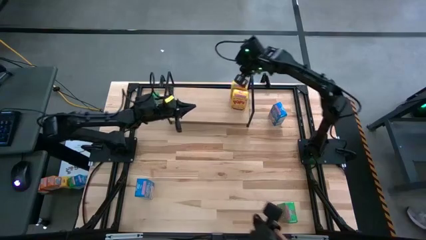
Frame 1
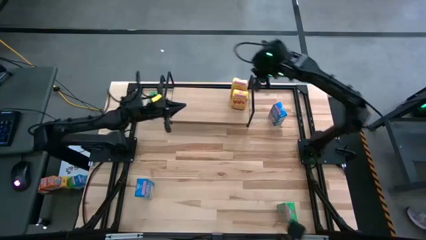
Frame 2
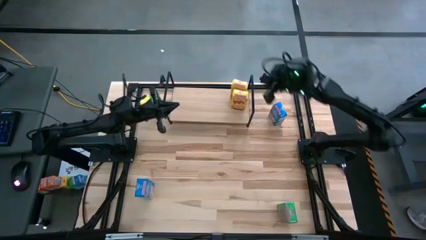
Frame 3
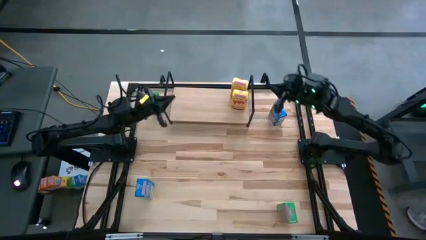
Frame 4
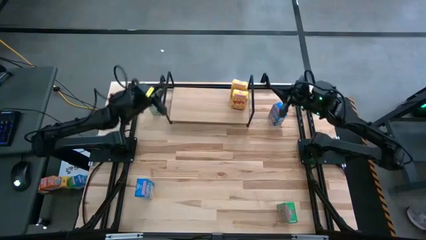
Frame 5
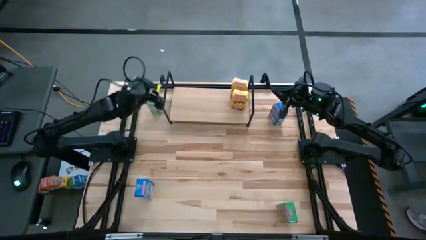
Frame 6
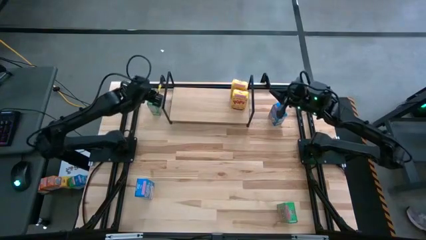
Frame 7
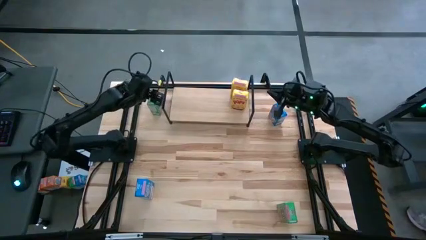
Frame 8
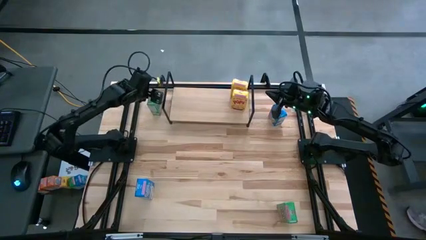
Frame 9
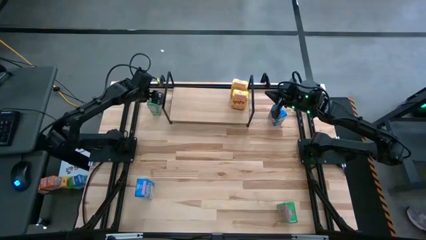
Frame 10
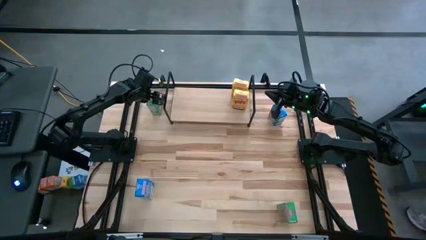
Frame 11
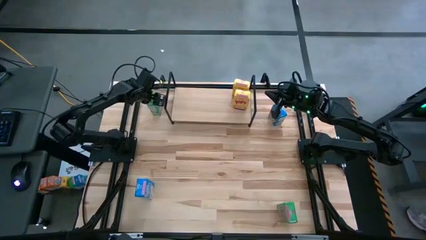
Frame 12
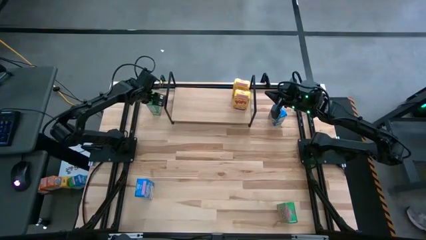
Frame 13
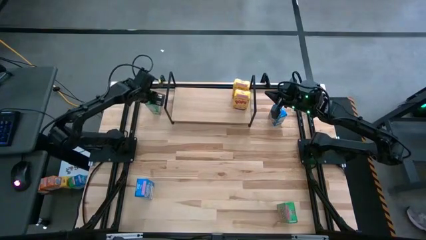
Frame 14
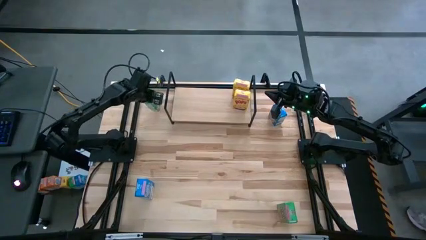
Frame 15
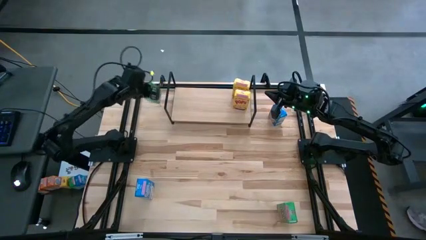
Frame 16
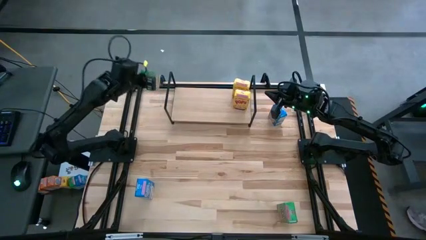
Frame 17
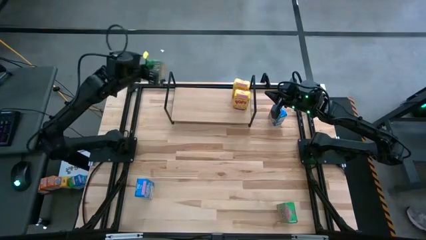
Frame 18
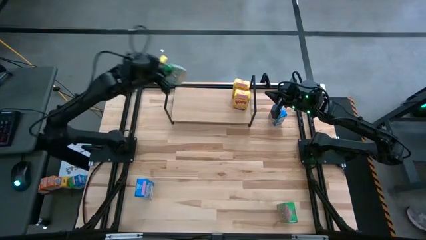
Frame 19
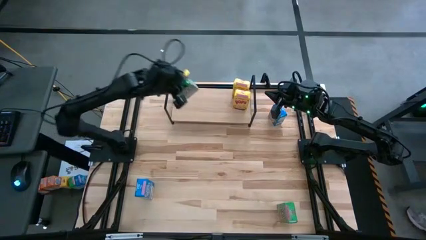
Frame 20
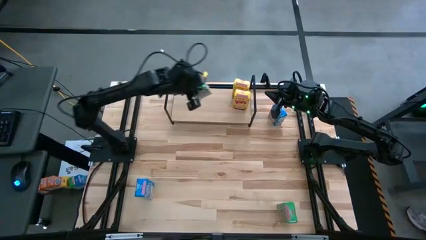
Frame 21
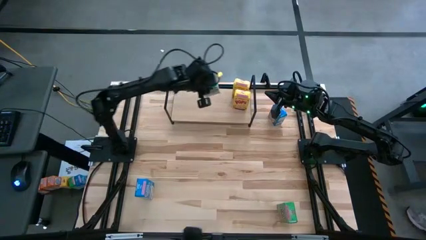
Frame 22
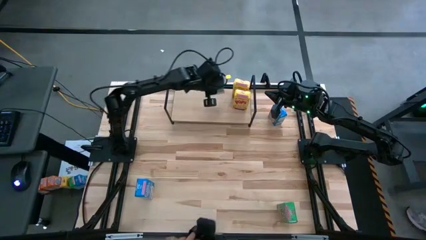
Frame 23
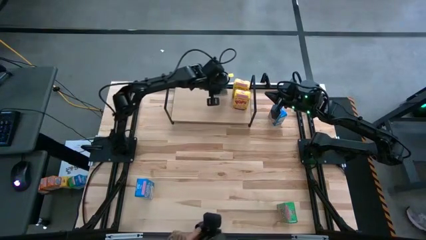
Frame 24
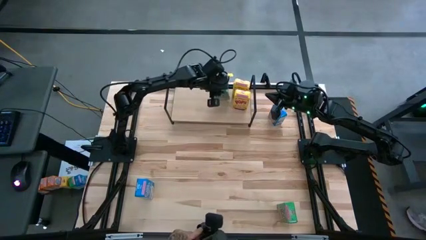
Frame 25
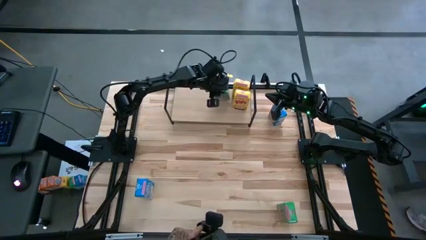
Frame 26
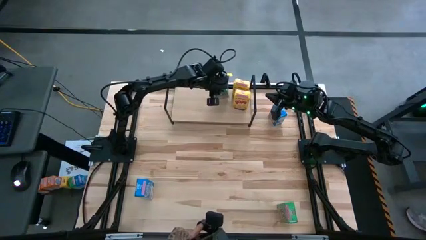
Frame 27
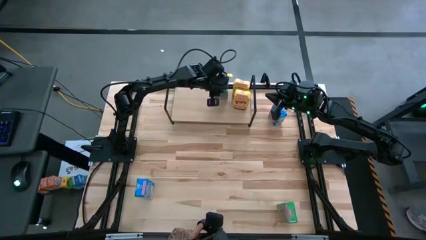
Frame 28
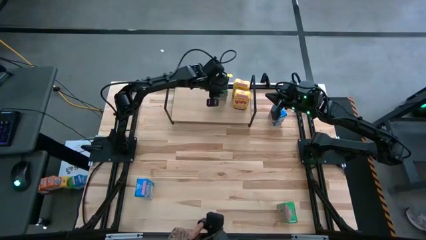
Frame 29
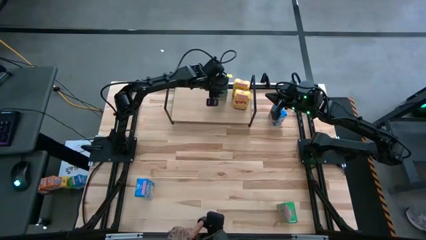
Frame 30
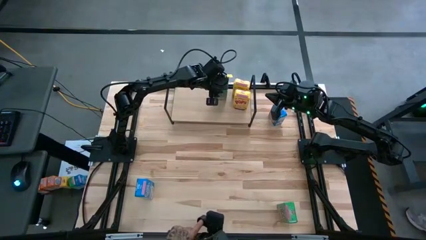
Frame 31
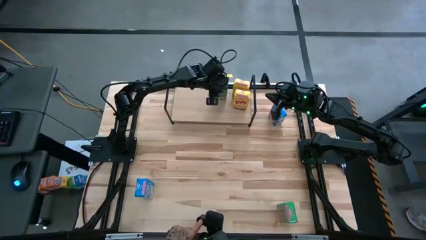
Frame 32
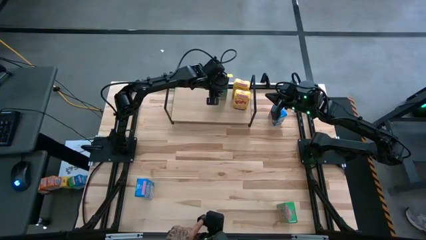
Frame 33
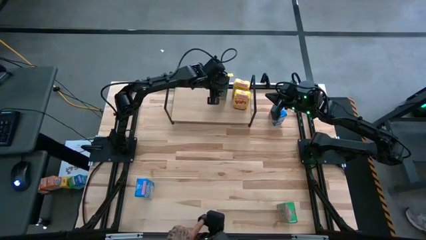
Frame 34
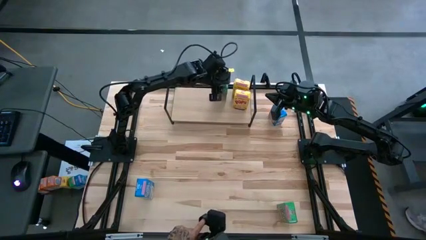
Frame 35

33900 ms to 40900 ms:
Task: Stack cereal on shelf
Put the top green cereal box on the shelf

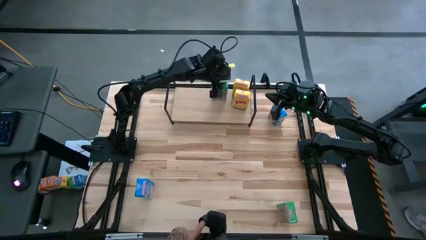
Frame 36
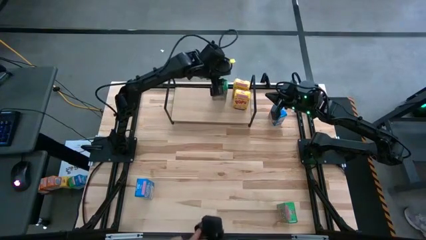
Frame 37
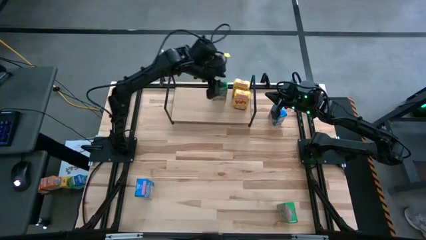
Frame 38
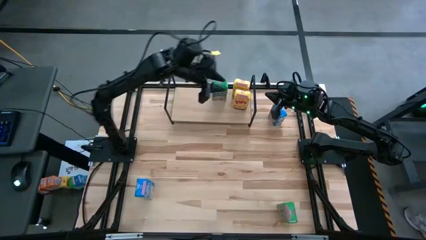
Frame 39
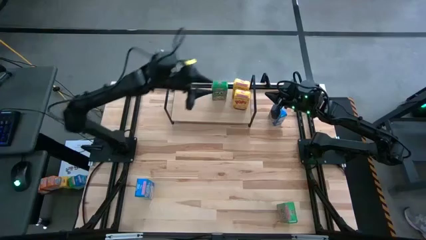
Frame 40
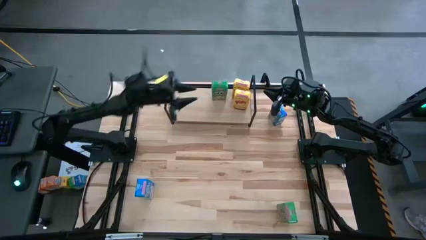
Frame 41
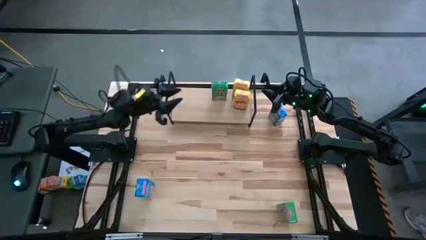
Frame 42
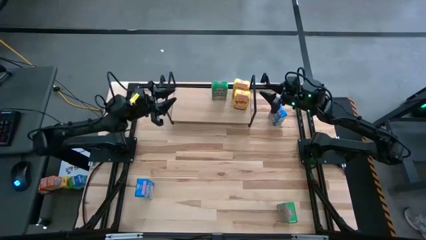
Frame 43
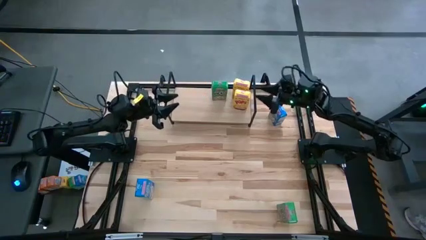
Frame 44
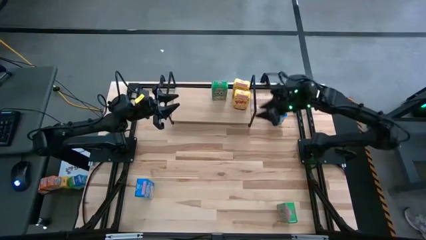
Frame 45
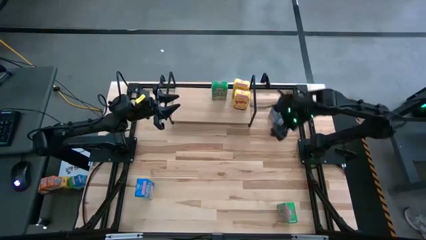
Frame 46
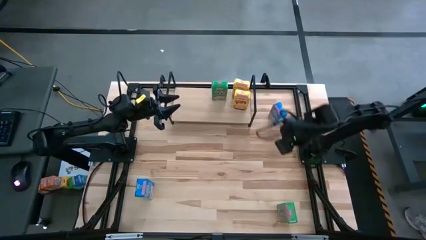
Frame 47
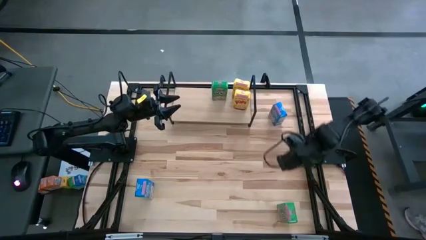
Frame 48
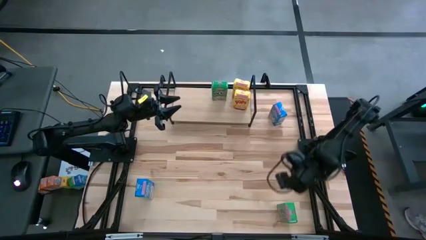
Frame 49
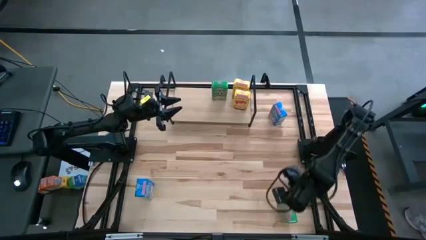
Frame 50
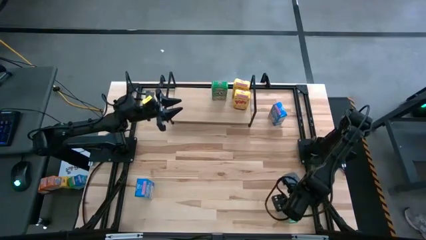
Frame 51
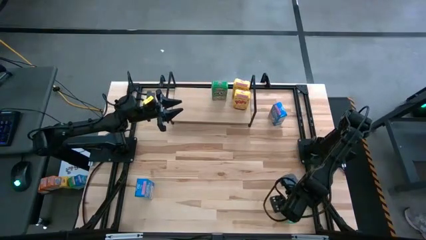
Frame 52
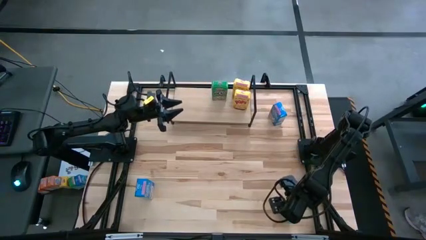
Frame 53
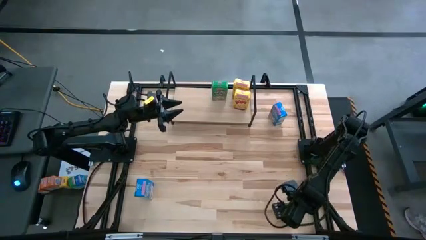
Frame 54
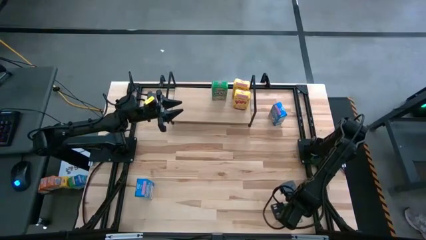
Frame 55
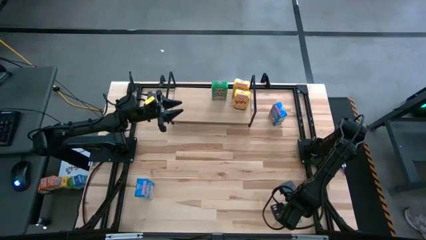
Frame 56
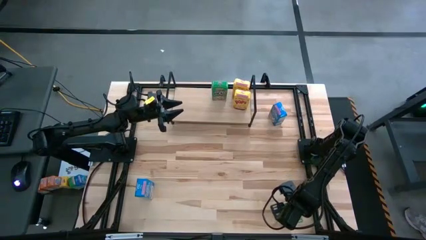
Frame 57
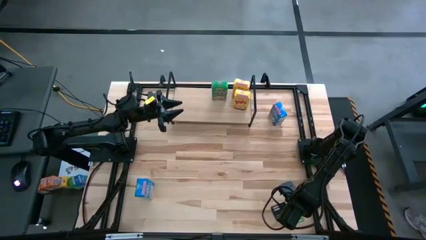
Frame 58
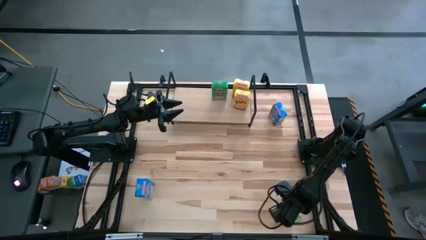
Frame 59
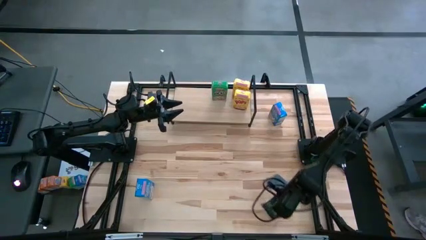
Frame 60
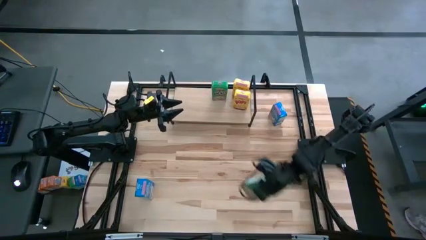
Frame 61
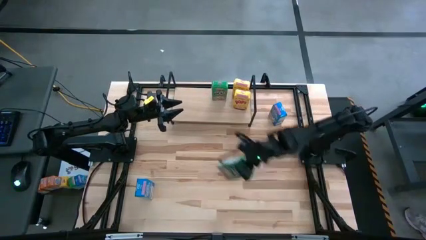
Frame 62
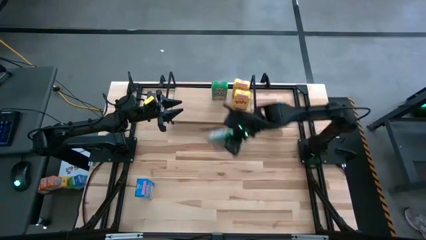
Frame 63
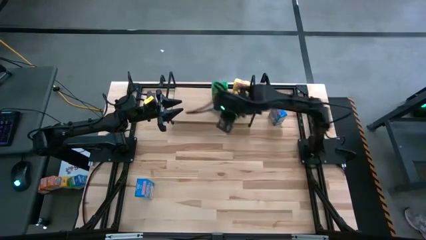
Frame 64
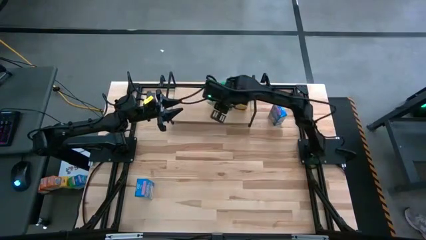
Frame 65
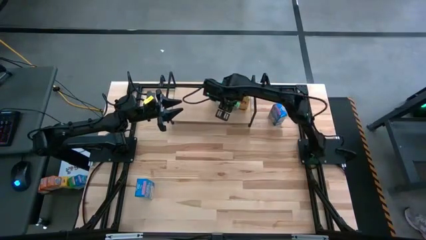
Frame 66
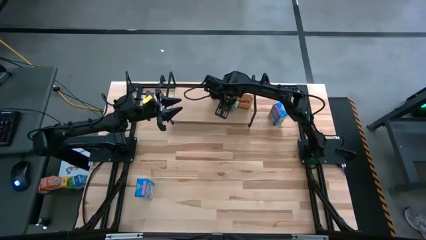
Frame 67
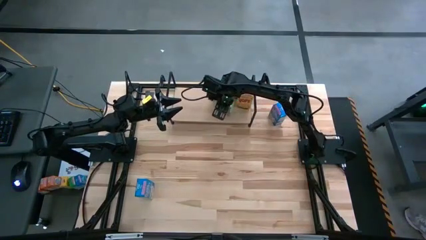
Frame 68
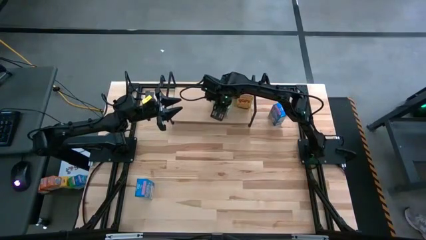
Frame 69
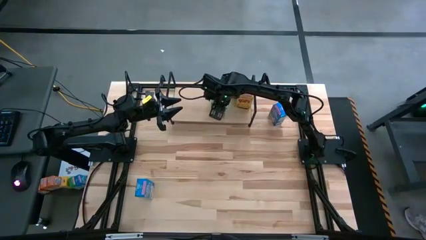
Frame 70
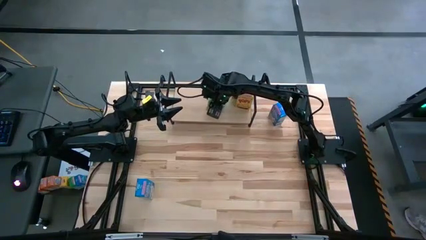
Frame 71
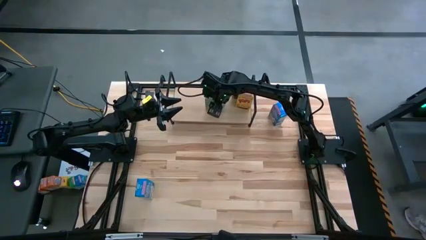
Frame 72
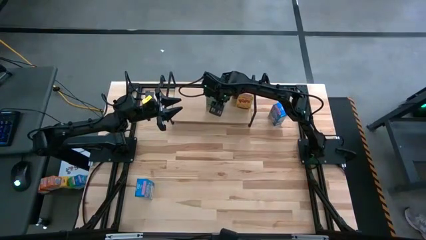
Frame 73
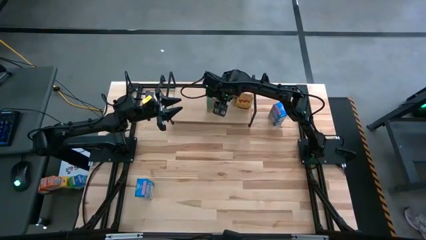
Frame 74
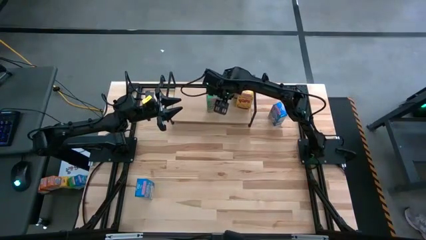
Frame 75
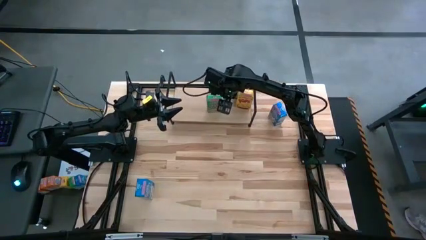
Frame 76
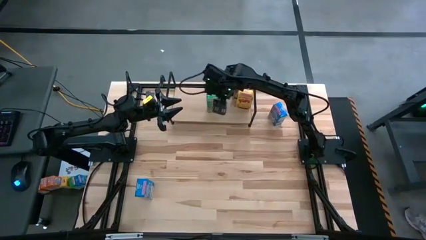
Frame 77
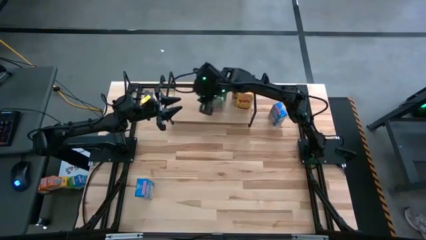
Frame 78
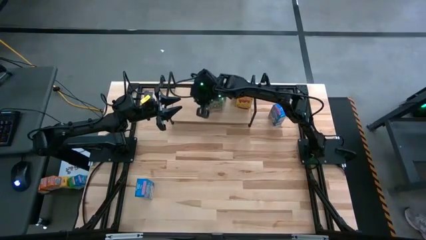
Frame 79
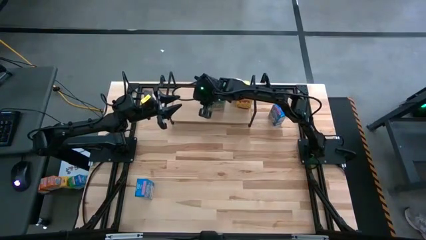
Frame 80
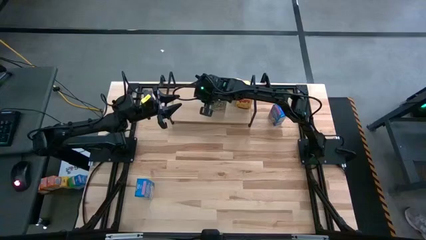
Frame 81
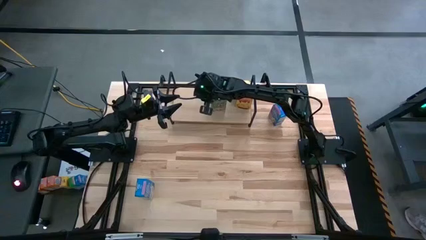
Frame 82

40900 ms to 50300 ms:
Put the green cereal box on the shelf aligned with the other green cereal box
